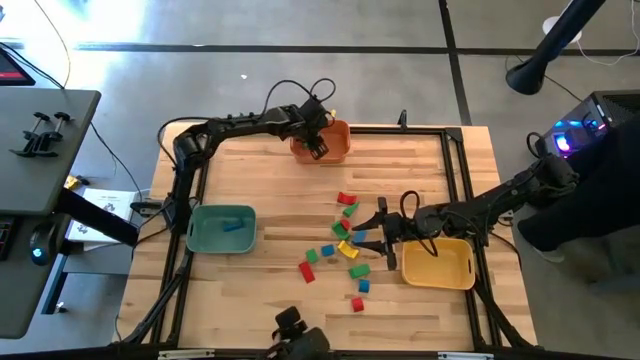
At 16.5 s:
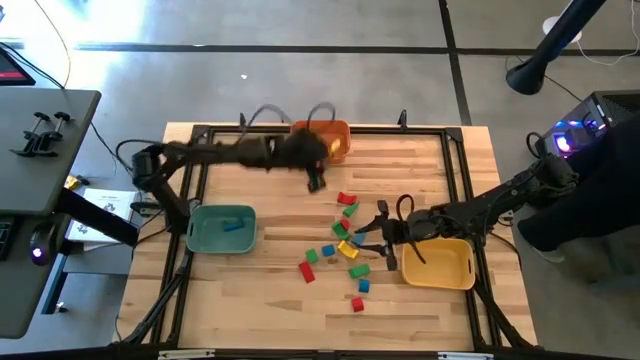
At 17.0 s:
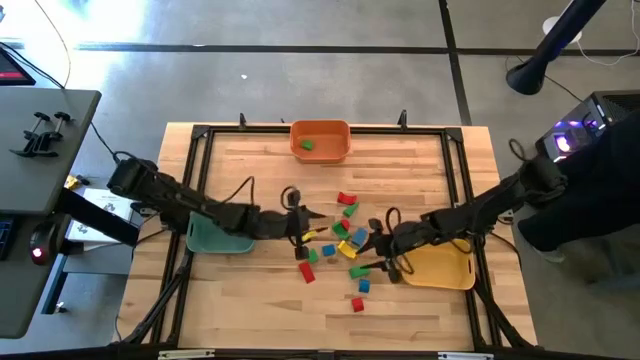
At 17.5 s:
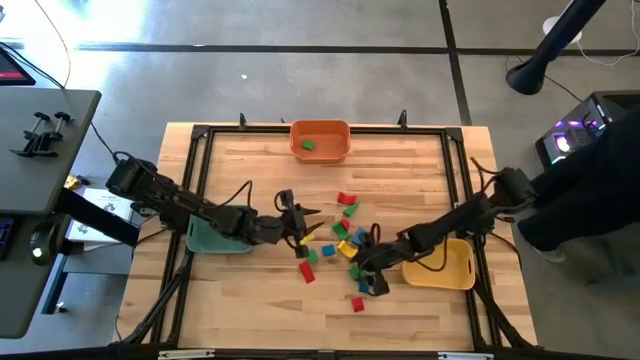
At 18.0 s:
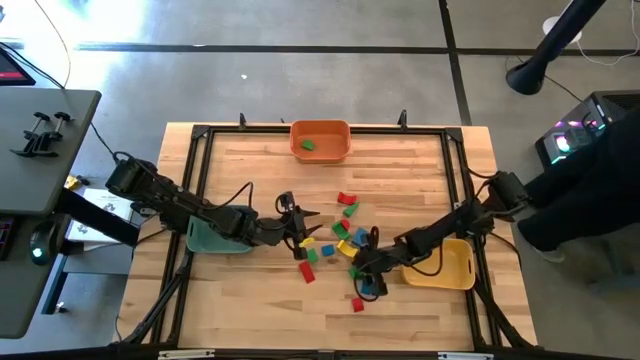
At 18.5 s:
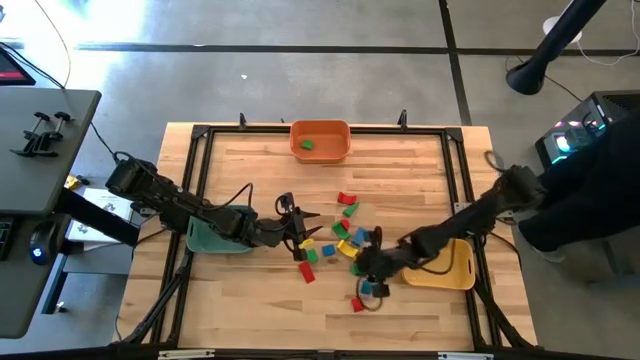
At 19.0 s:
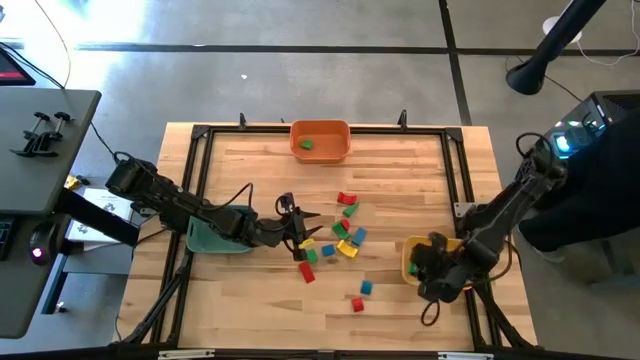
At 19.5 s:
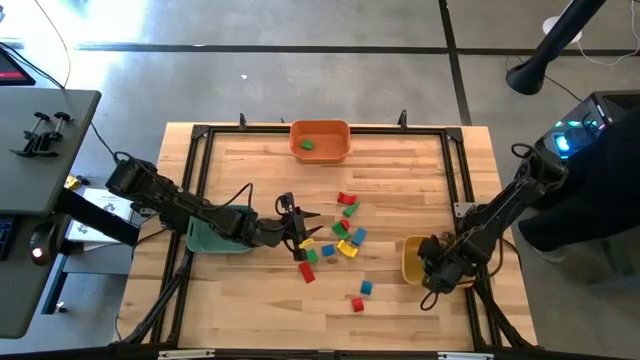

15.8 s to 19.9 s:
Task: Sort blocks by size
Put the green triangle block into the yellow bin

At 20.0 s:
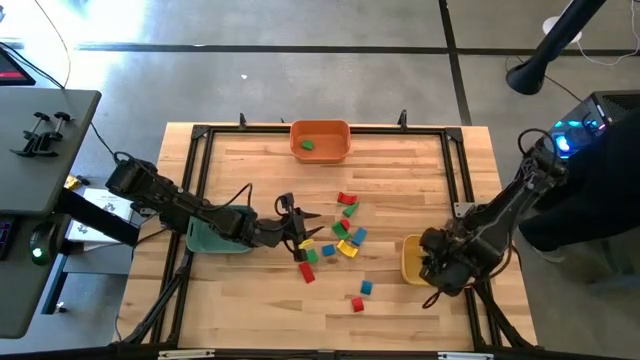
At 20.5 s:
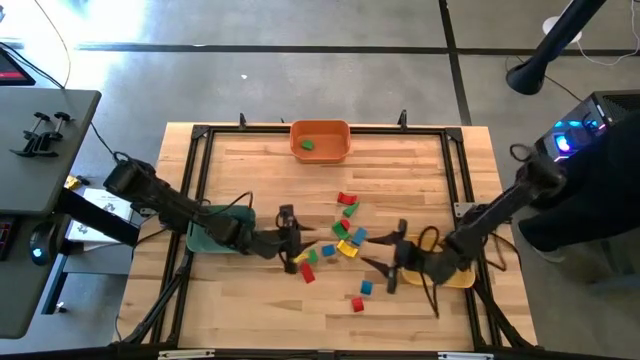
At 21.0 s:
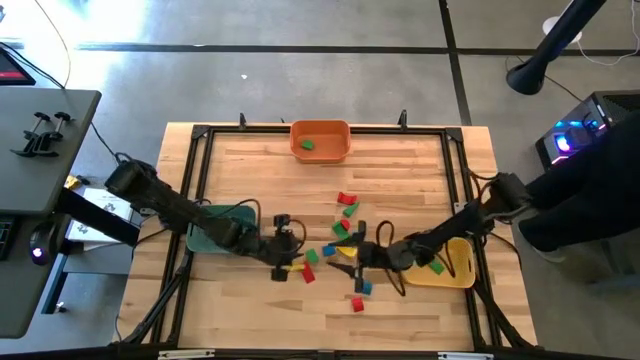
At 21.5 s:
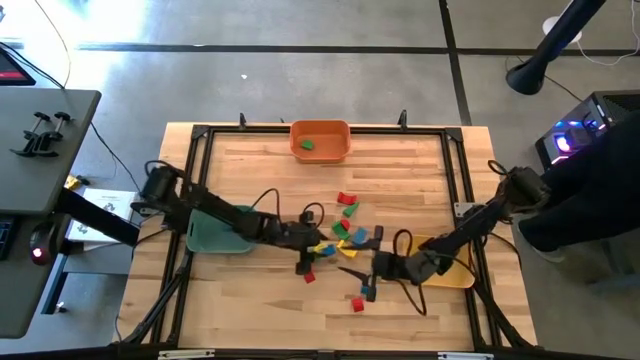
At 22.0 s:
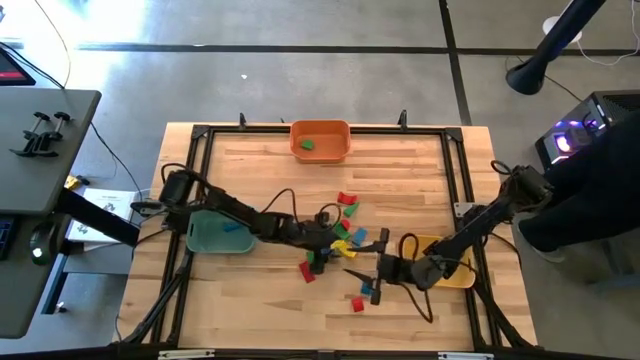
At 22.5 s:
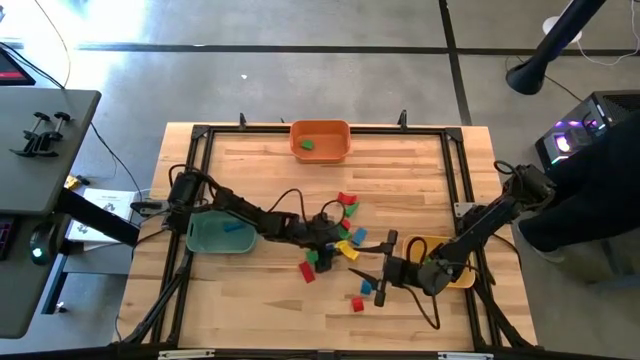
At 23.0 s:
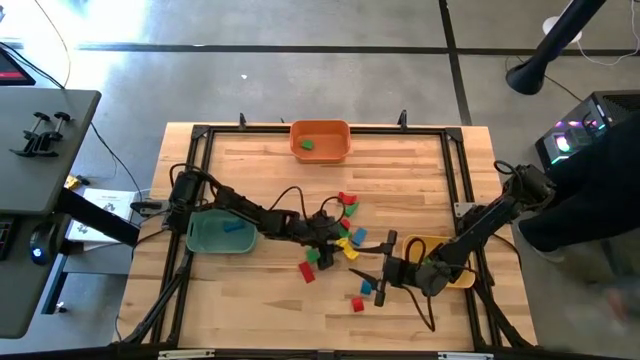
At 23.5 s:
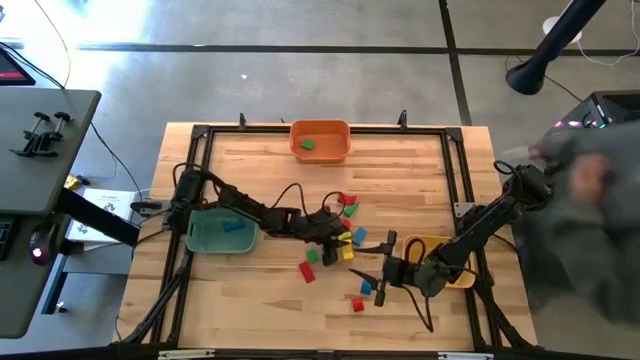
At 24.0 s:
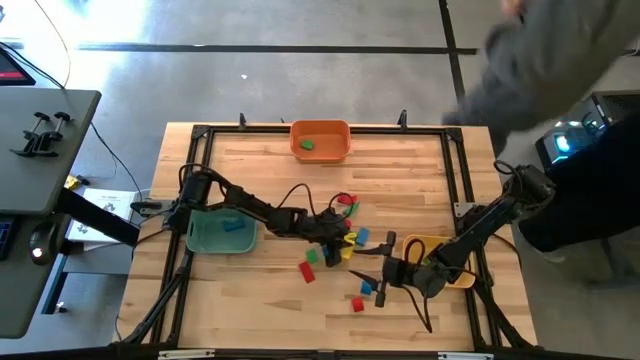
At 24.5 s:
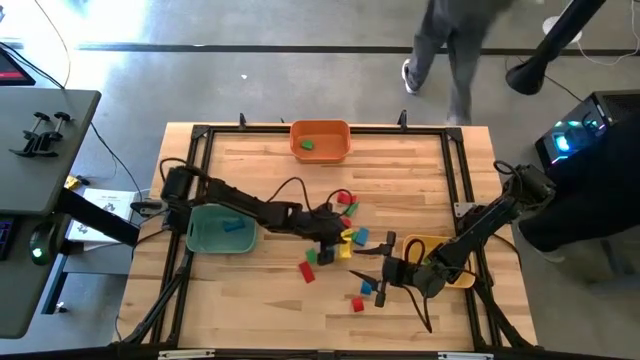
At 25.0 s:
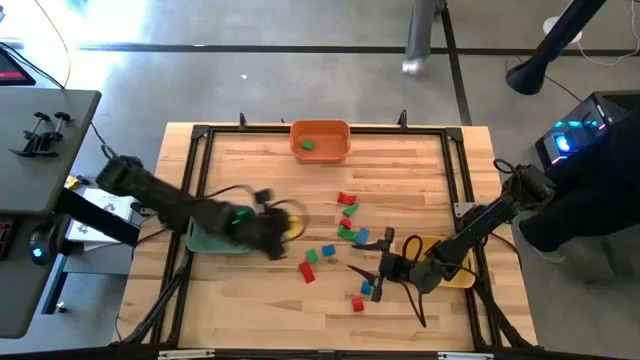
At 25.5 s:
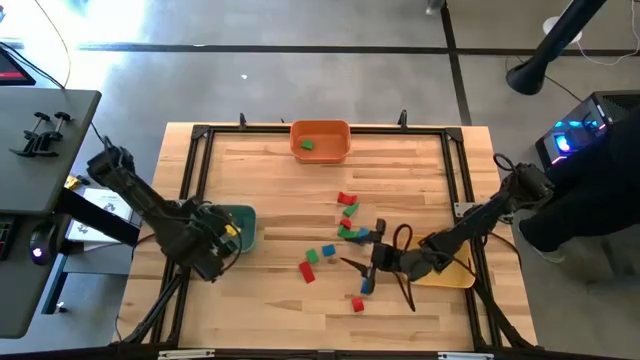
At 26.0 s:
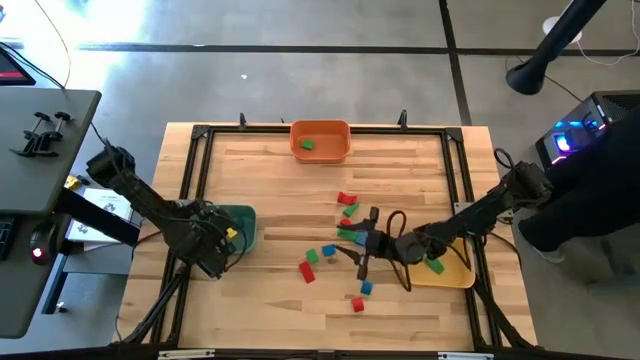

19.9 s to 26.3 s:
Put the yellow arch block into the green bin

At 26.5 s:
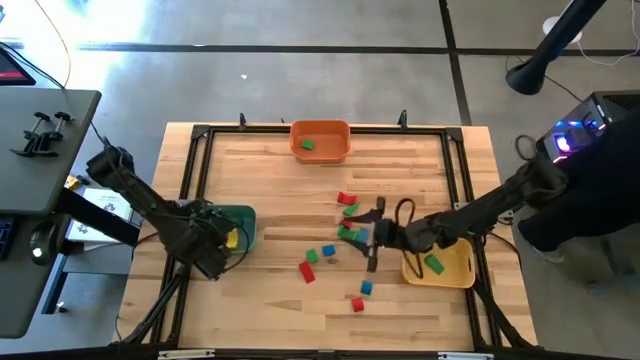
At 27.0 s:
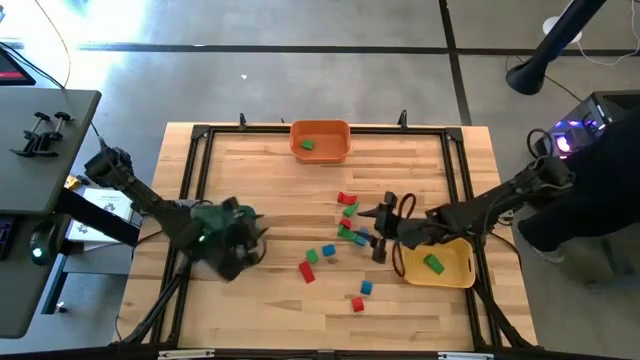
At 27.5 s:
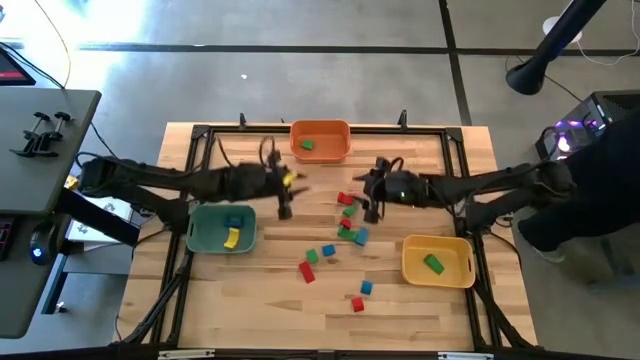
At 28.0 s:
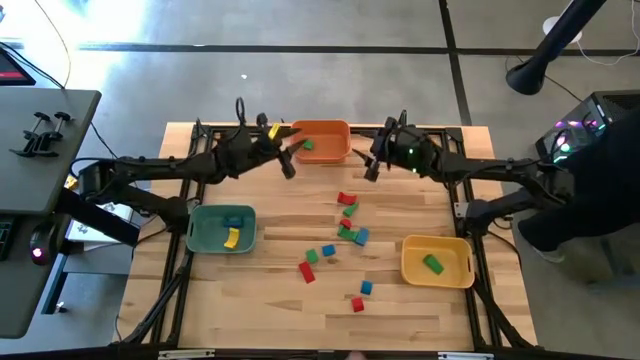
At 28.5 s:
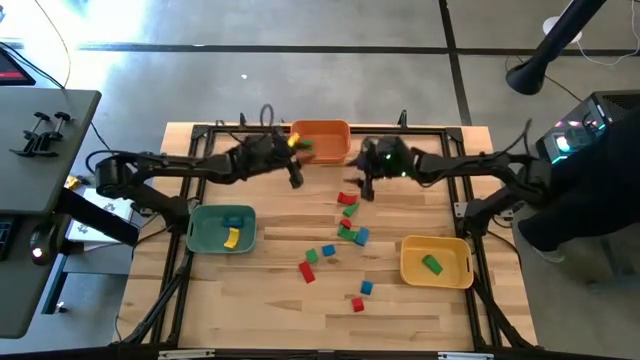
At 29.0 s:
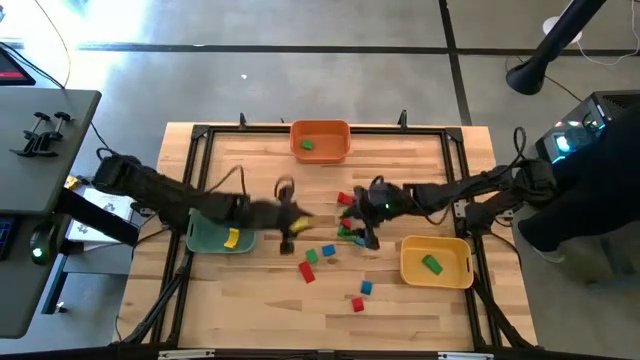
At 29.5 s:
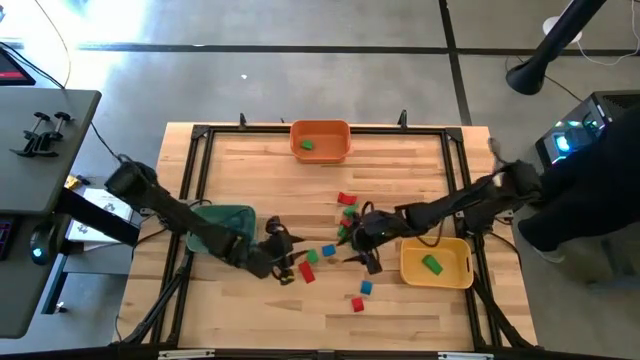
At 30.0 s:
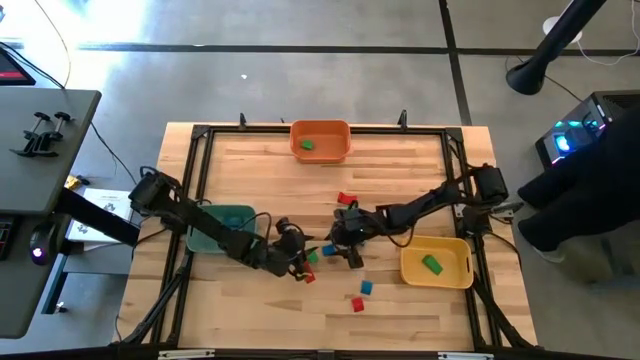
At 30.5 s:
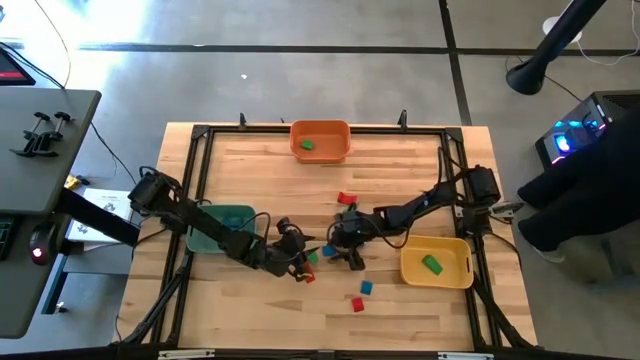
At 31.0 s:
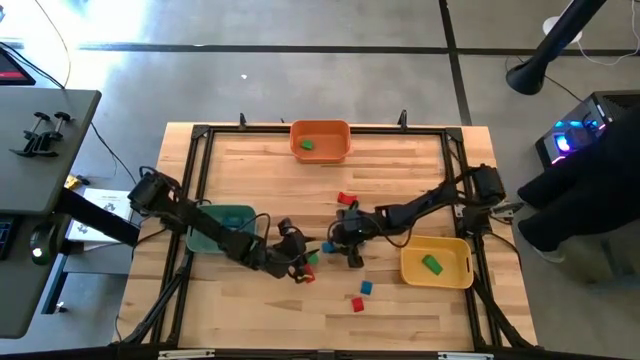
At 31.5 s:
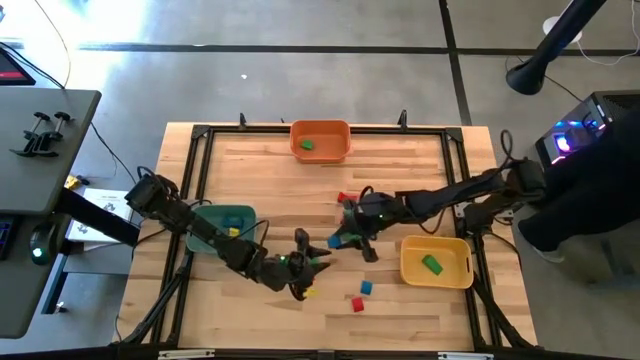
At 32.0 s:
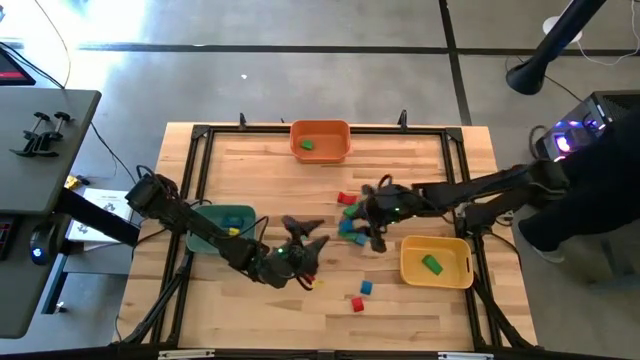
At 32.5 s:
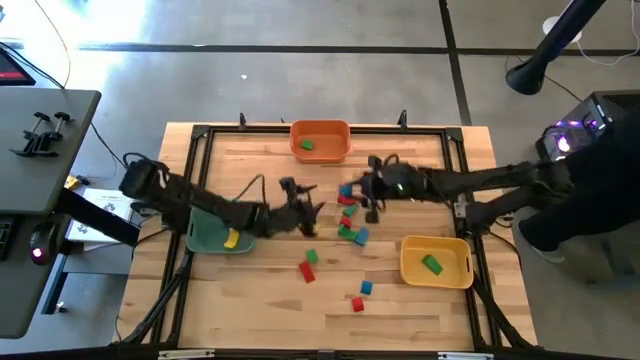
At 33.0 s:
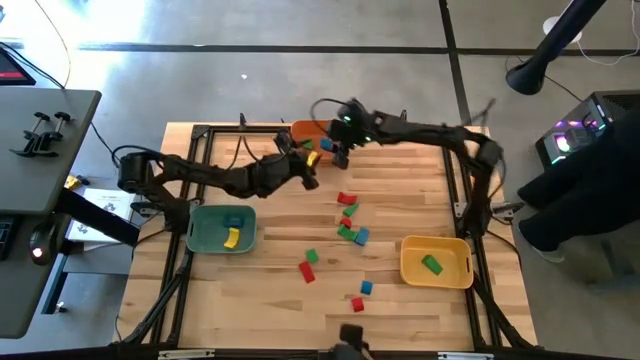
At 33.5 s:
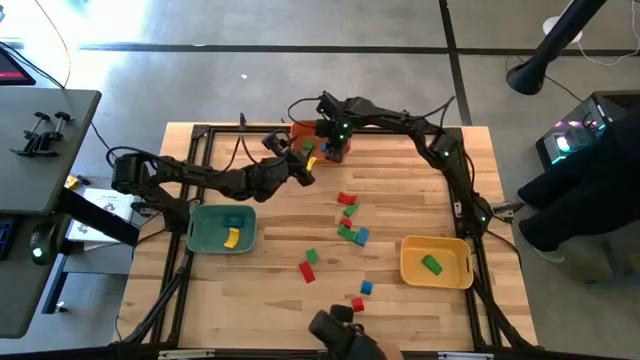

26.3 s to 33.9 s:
Put the blue half cylindrical block into the orange bin

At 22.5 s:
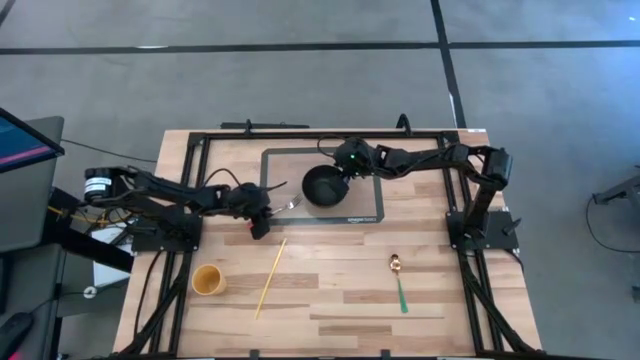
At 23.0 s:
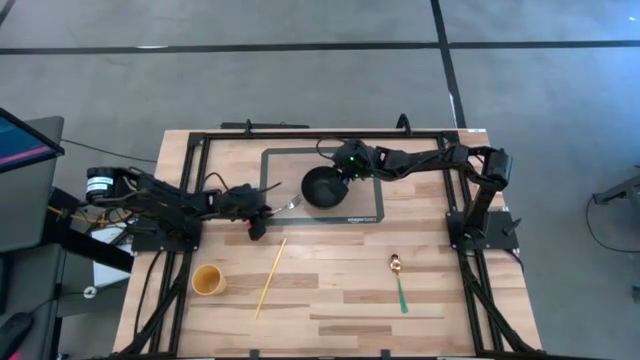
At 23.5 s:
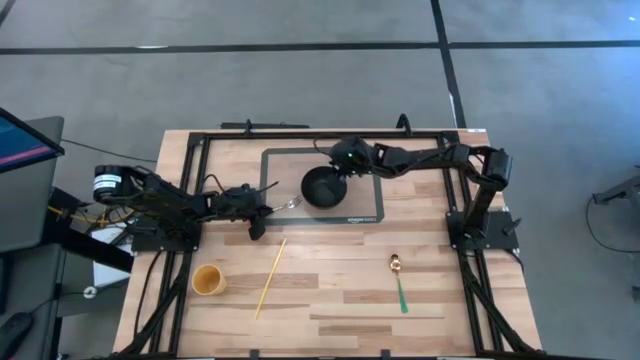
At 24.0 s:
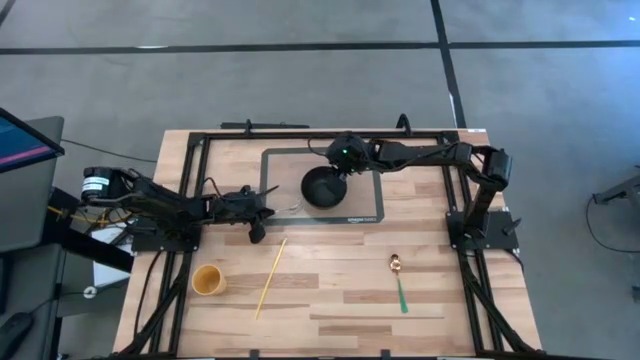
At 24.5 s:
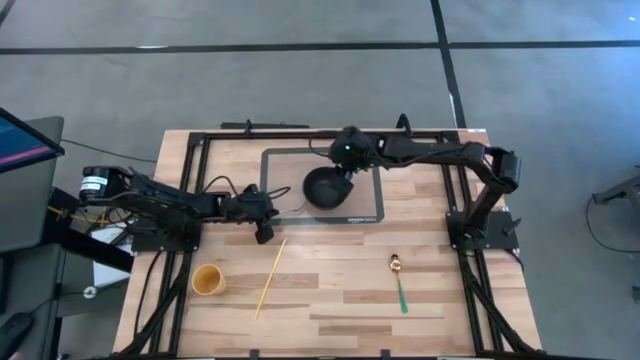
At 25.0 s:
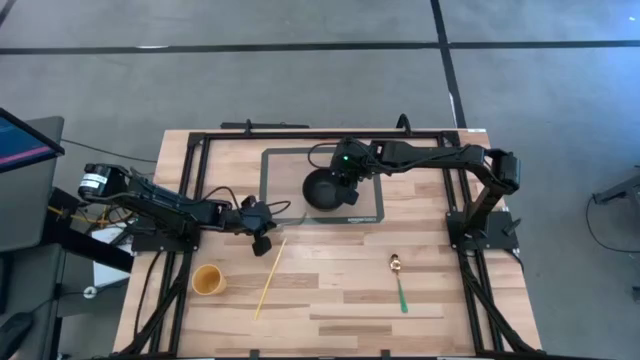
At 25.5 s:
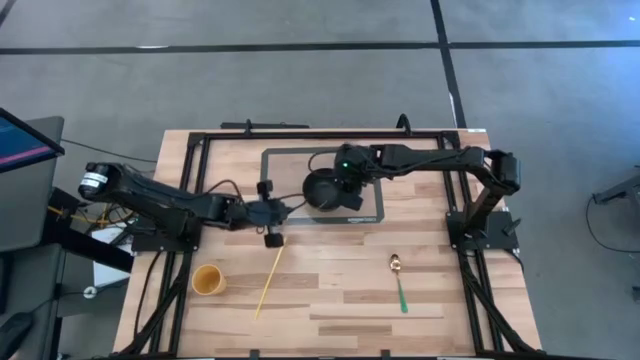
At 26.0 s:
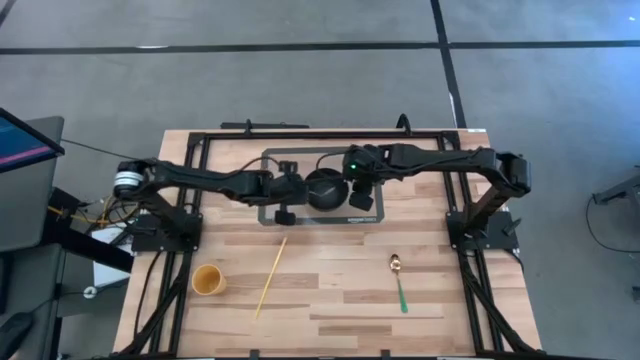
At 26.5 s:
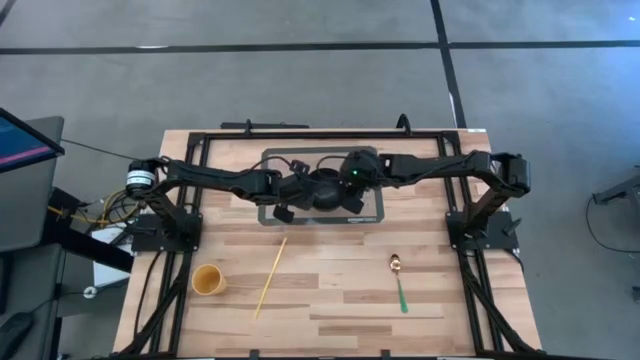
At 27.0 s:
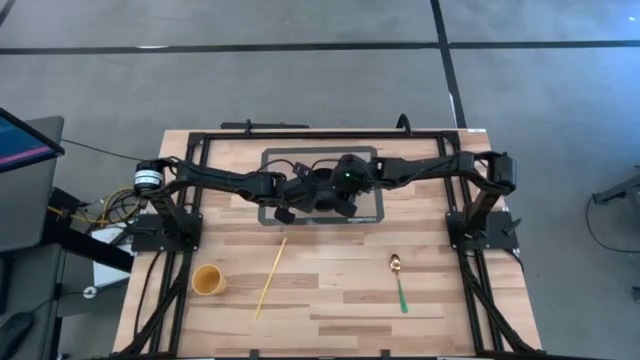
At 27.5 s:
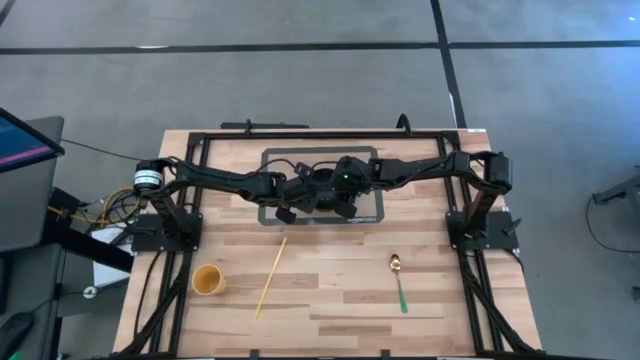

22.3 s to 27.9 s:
Task: Pick & Place Utensil
Put the orange fork into the black bowl
